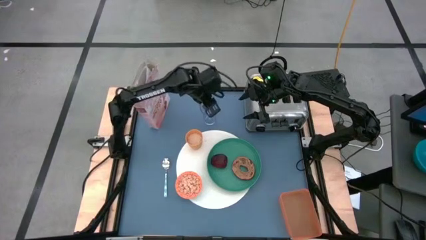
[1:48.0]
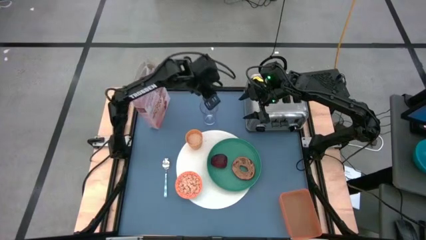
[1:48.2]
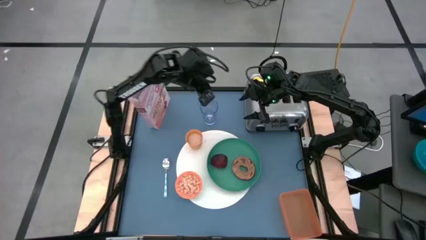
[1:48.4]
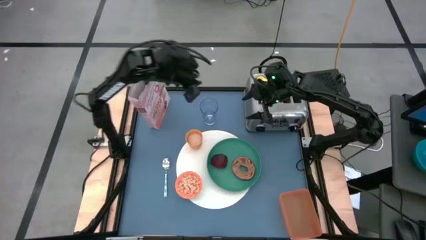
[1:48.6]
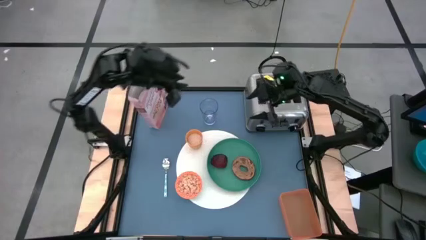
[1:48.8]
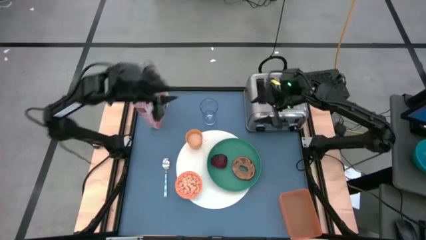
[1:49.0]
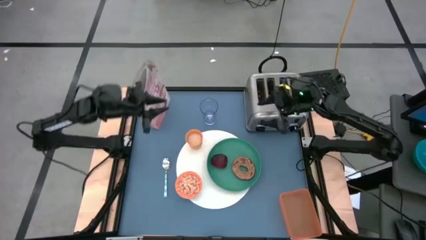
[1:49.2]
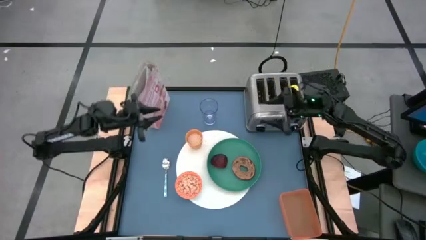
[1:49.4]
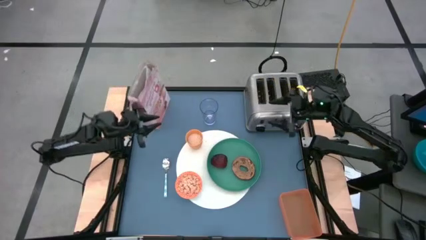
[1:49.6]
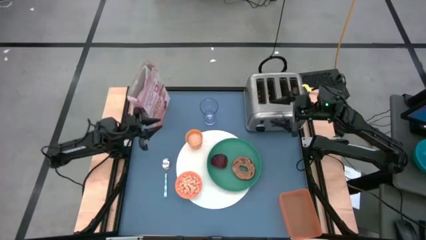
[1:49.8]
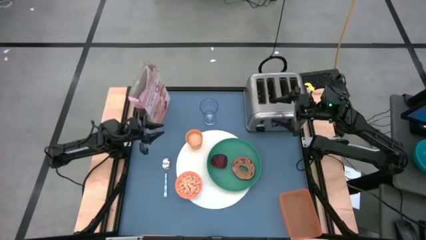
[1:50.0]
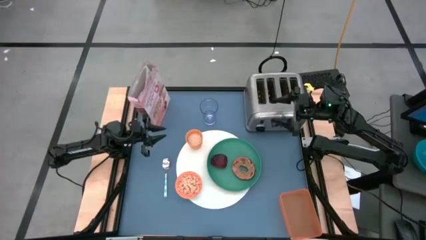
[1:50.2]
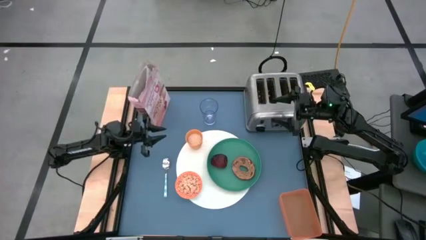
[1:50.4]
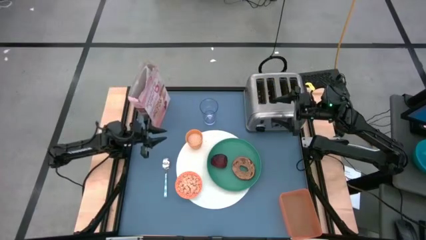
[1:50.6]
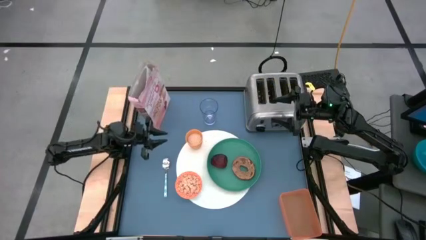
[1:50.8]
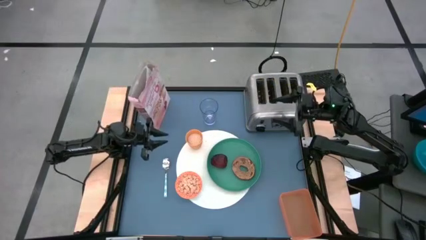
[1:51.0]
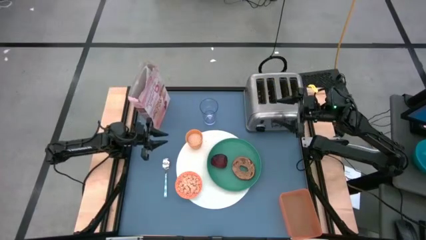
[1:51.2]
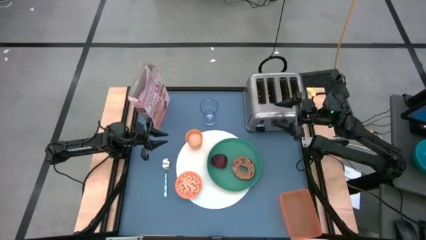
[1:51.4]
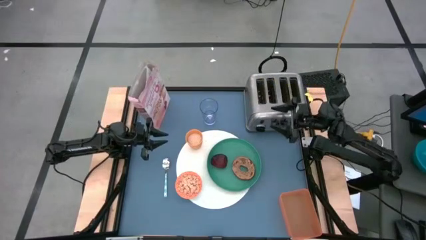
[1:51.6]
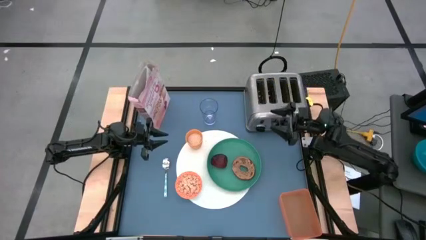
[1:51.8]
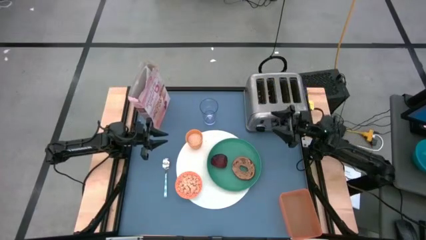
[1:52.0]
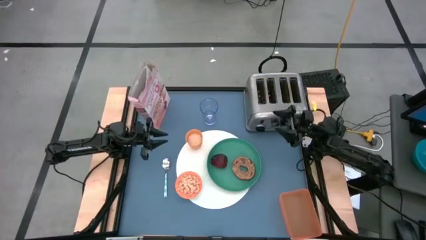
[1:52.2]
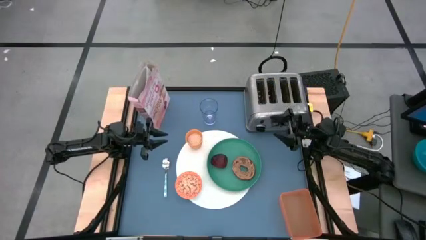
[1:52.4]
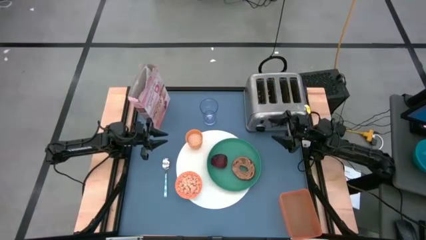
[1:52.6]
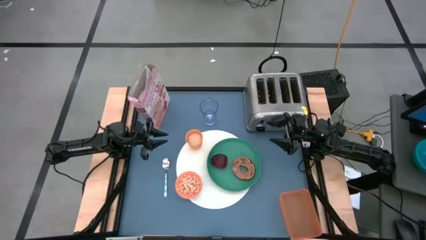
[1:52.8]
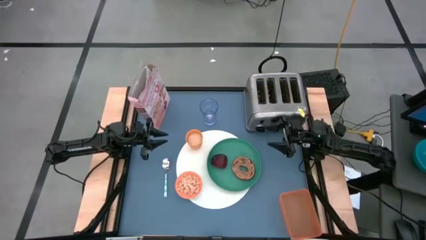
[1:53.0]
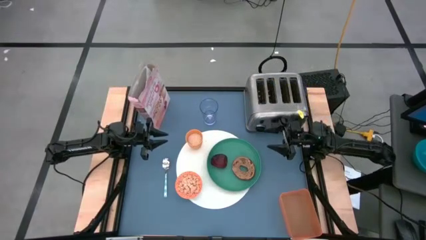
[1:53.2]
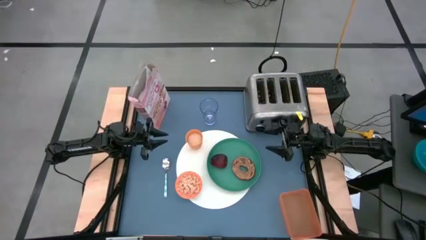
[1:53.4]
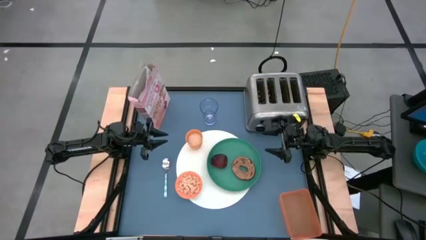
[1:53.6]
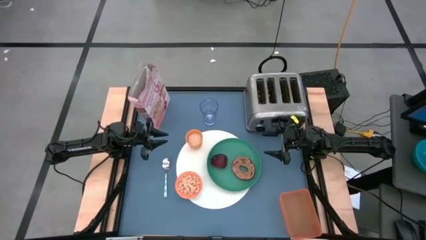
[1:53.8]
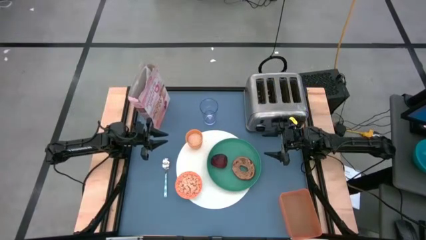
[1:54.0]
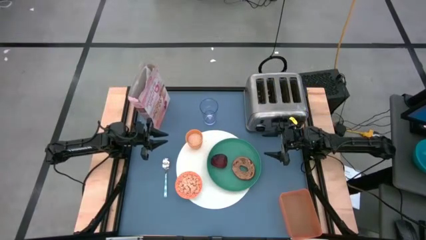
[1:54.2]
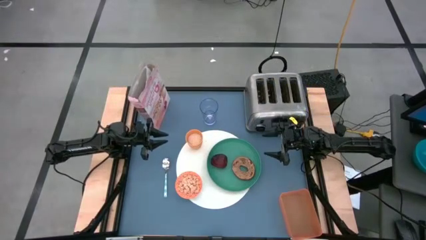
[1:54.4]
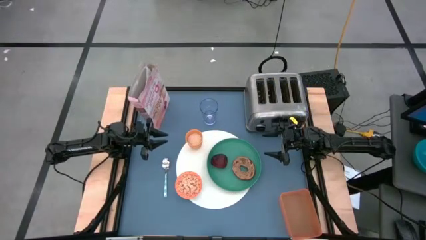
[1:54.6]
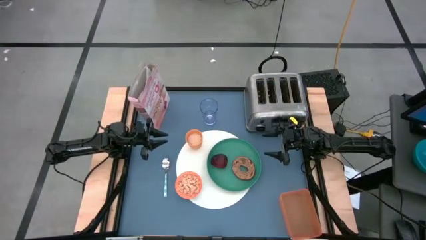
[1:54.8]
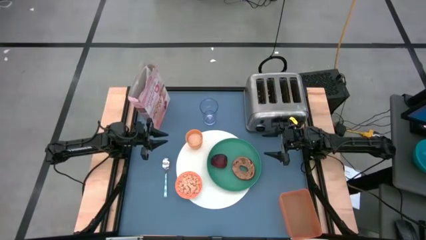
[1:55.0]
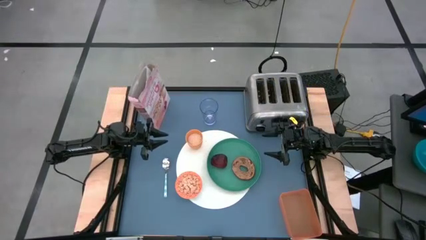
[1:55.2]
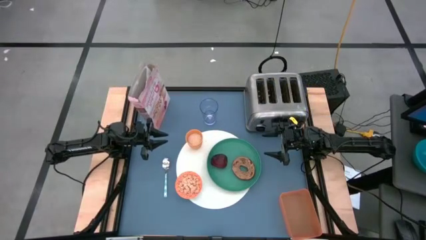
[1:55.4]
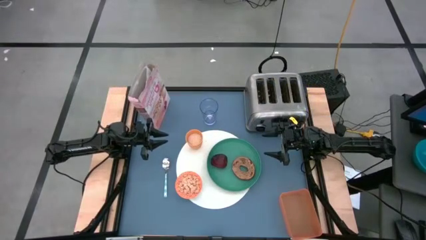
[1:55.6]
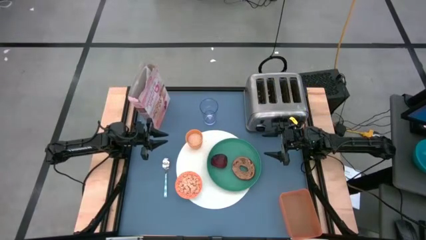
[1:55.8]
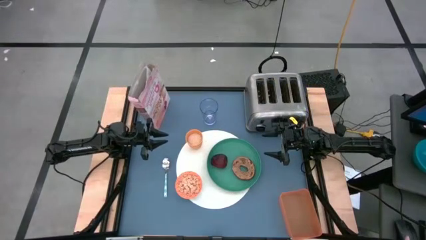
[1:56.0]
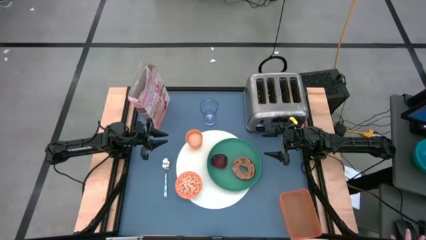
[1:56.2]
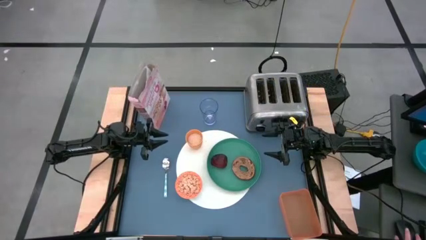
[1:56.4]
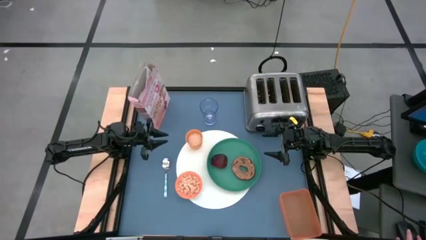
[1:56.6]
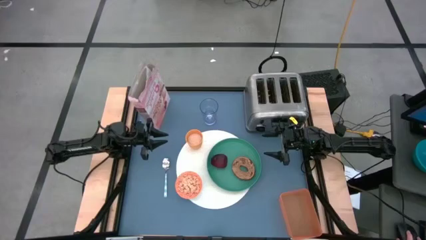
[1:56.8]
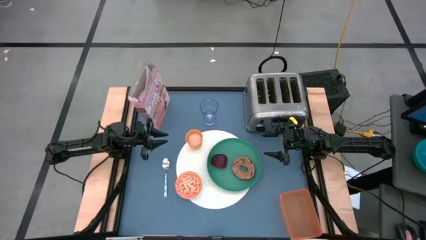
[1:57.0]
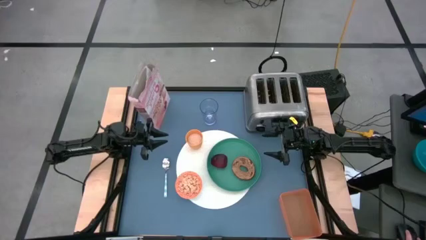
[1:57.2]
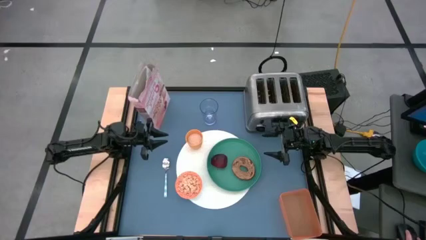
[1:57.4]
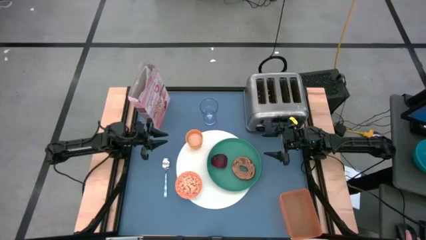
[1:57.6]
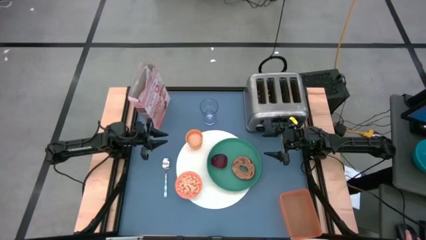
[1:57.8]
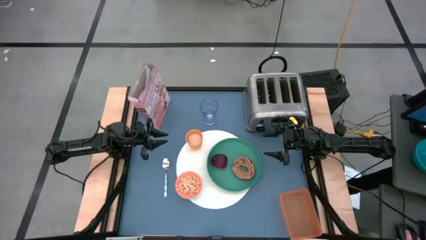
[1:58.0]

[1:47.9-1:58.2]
Task: Arrange a breakfast setting
Return to Home Position

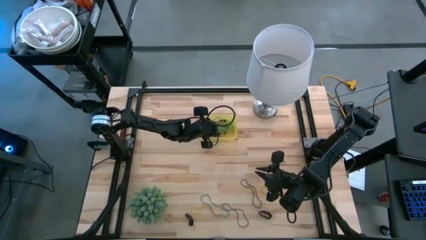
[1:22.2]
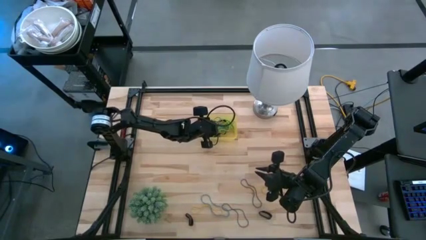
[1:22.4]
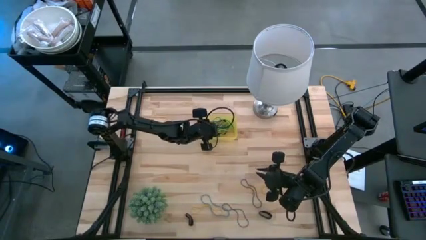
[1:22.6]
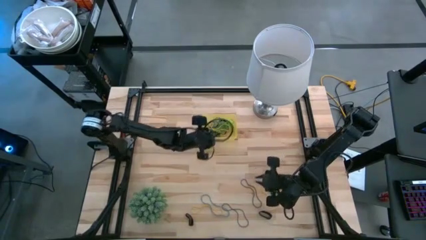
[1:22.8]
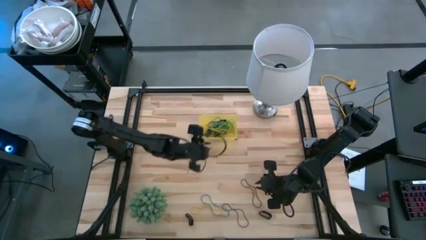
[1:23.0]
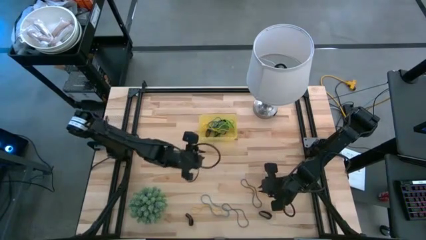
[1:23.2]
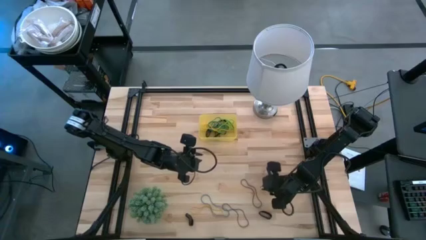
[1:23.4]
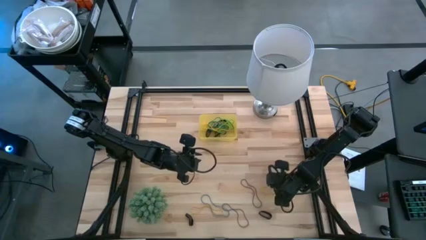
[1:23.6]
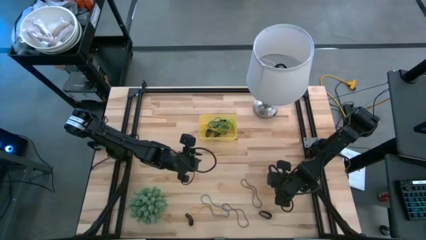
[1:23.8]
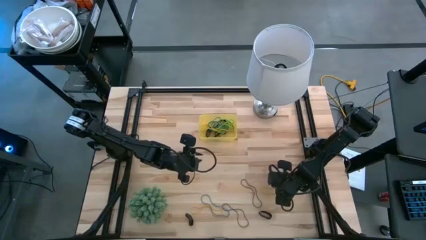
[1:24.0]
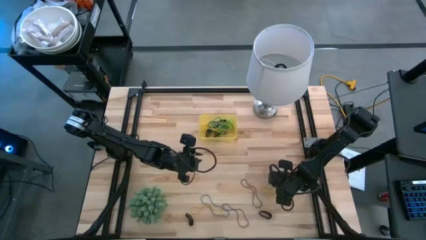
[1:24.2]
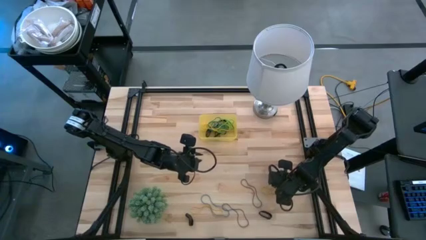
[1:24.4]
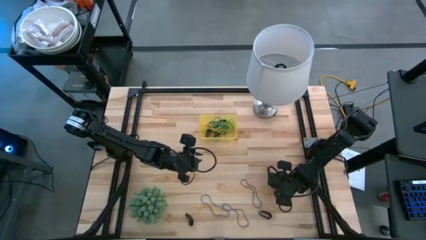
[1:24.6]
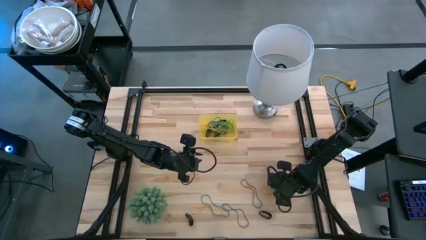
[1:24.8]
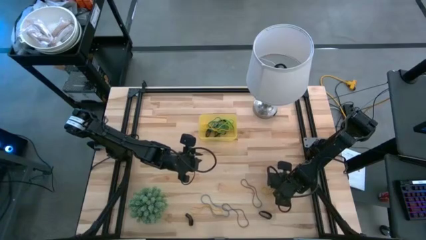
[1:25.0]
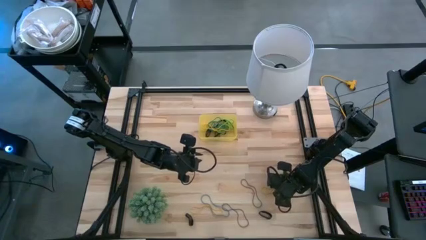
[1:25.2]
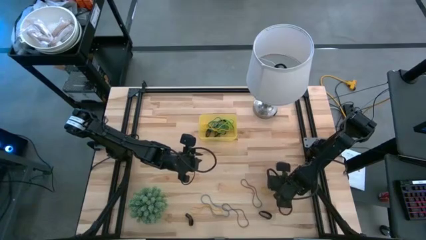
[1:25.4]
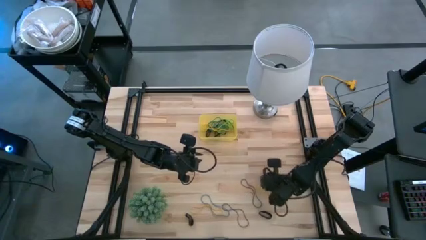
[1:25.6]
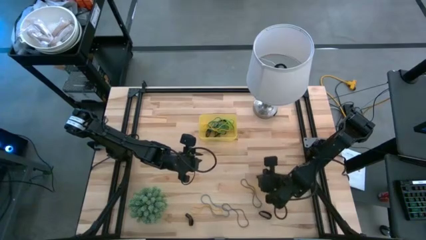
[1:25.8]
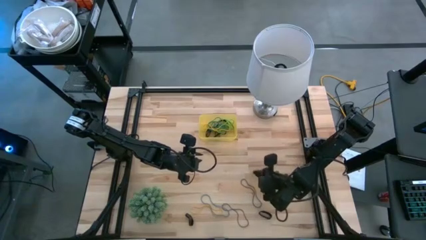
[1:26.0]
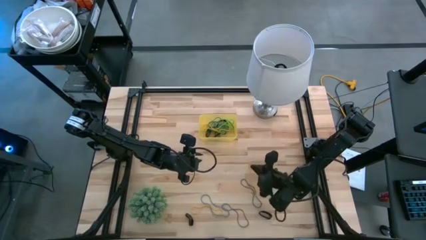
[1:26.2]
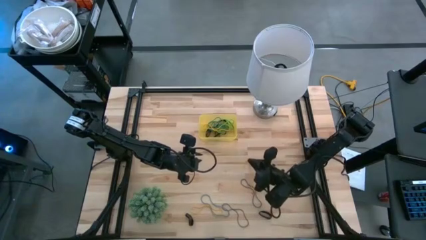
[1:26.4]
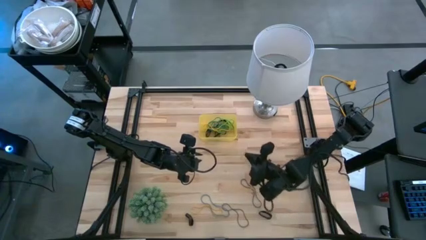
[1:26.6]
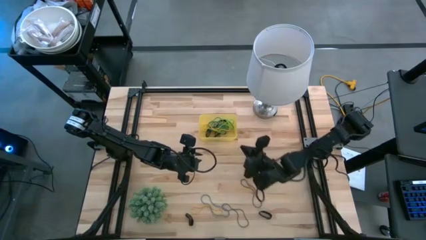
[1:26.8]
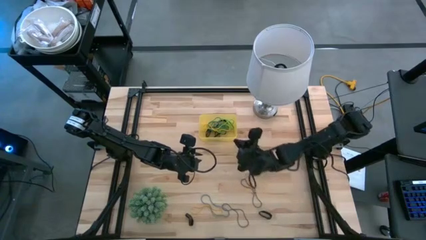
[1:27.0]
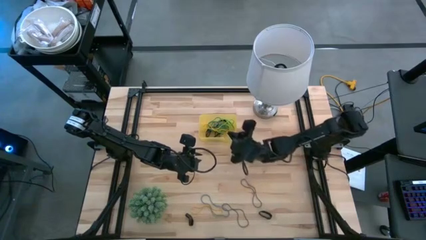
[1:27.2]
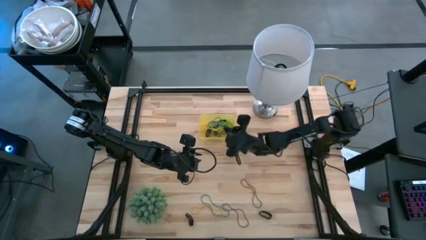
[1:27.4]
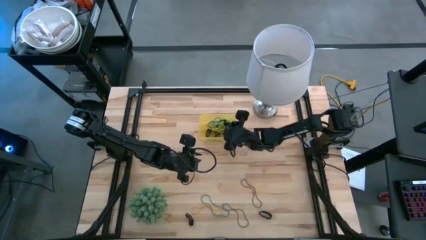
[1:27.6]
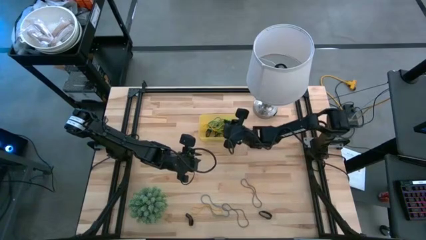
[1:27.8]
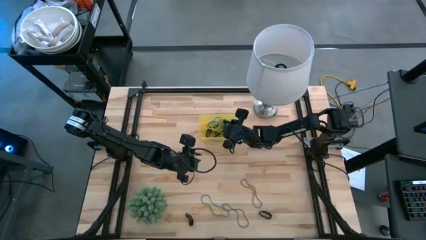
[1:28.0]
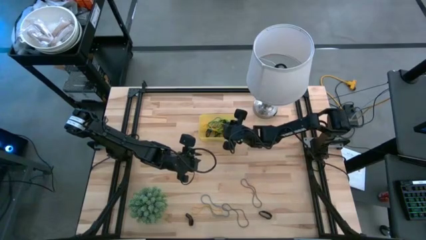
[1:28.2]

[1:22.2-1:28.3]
Task: Pick and place rubber bands into bin
Put the yellow rubber band into the yellow bin
